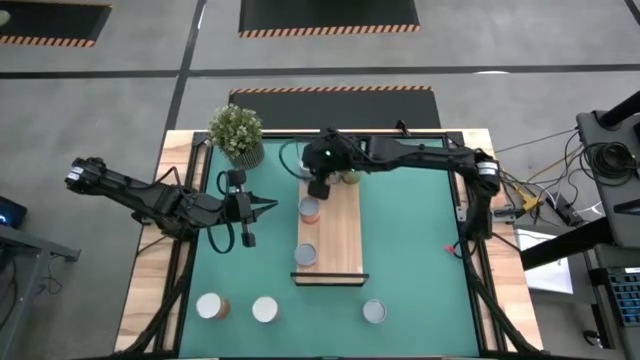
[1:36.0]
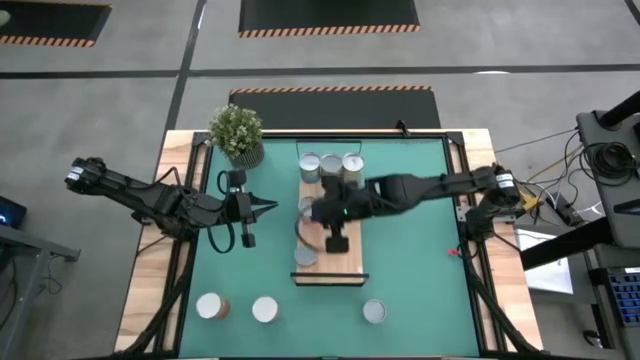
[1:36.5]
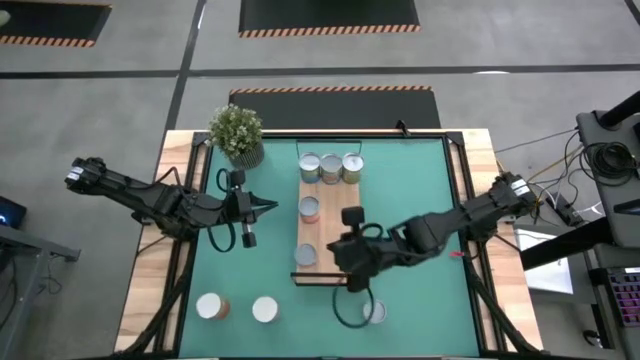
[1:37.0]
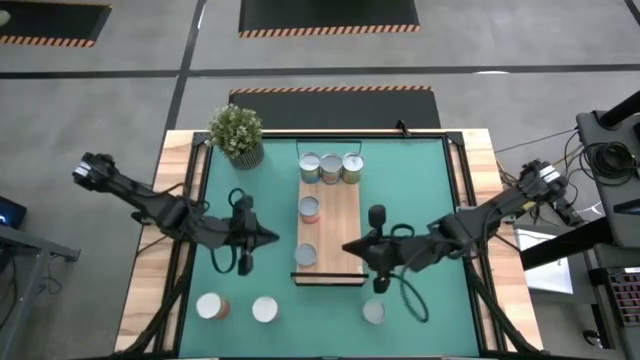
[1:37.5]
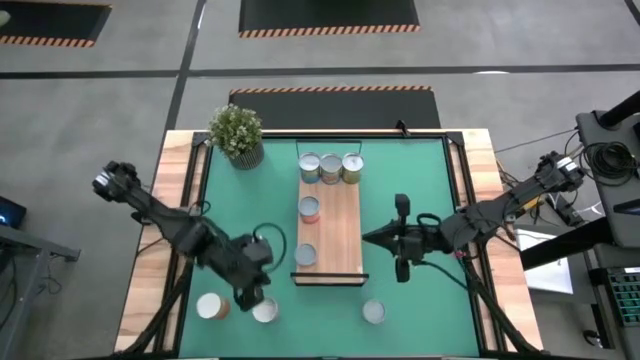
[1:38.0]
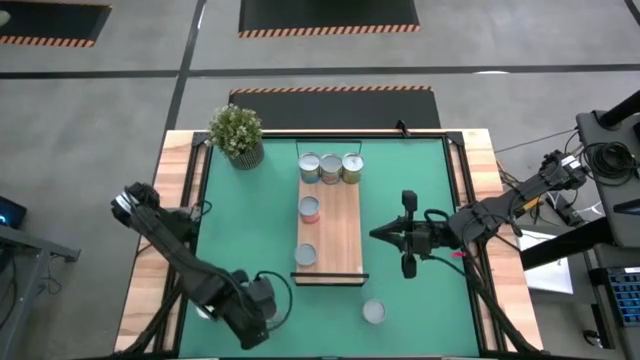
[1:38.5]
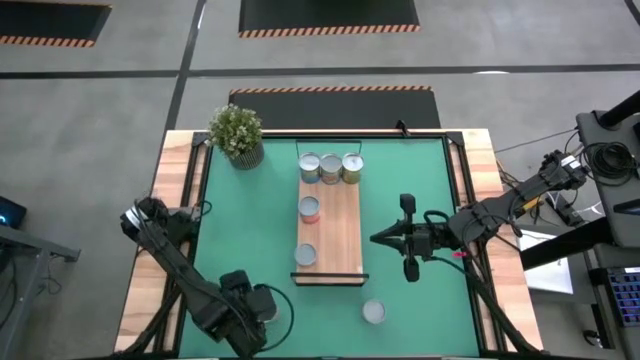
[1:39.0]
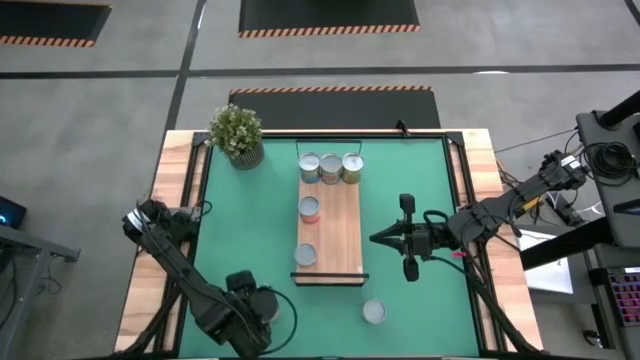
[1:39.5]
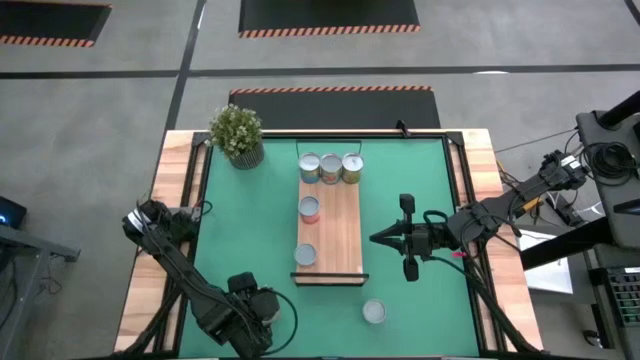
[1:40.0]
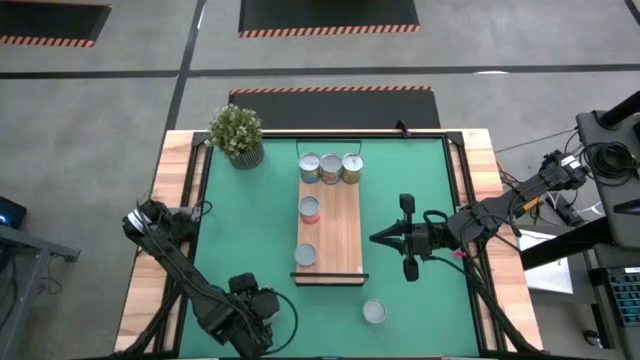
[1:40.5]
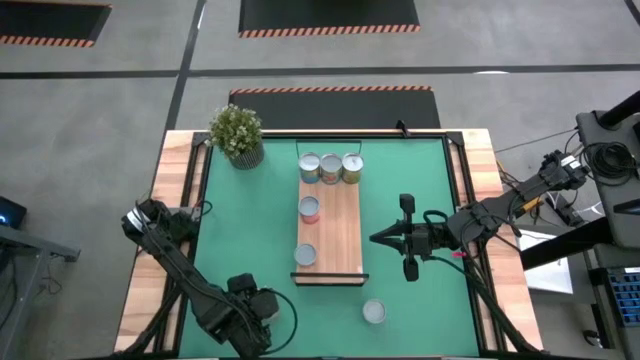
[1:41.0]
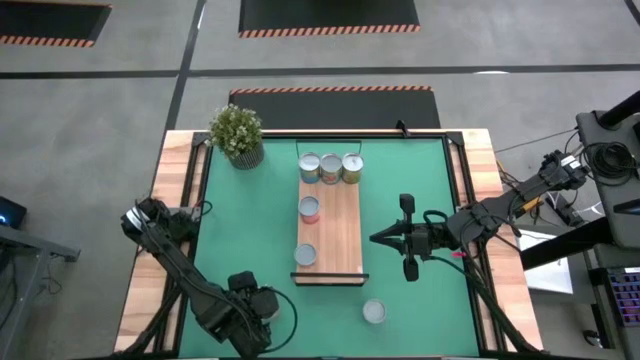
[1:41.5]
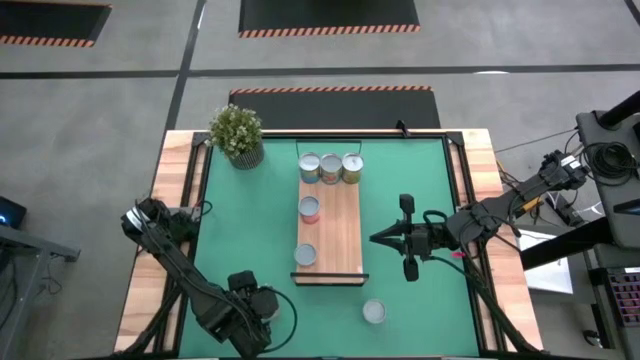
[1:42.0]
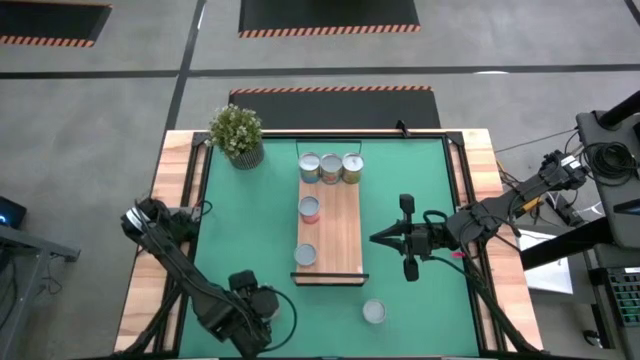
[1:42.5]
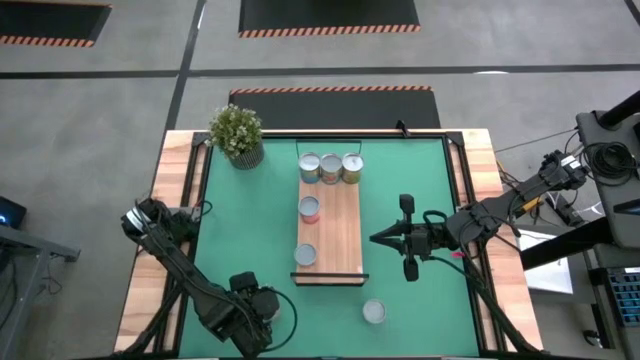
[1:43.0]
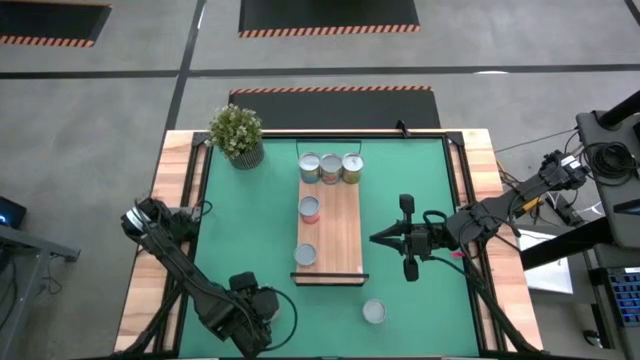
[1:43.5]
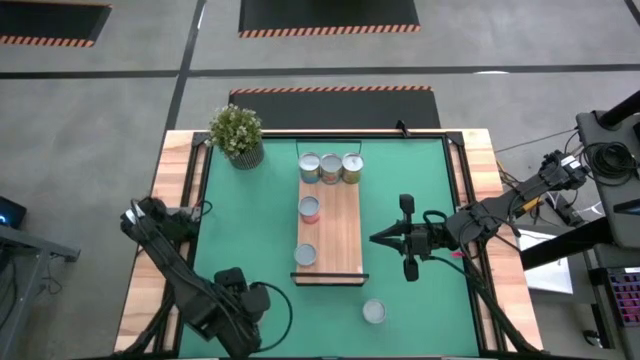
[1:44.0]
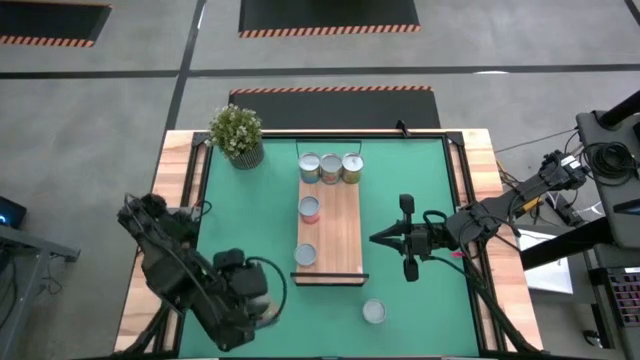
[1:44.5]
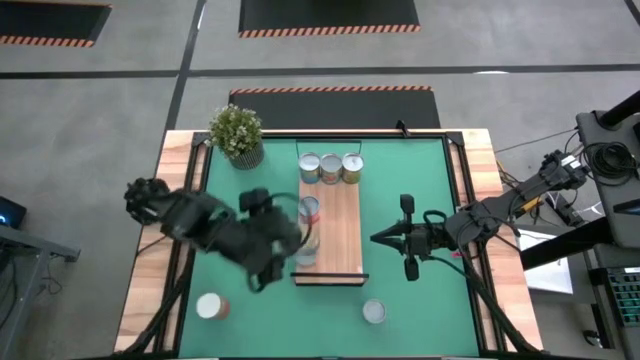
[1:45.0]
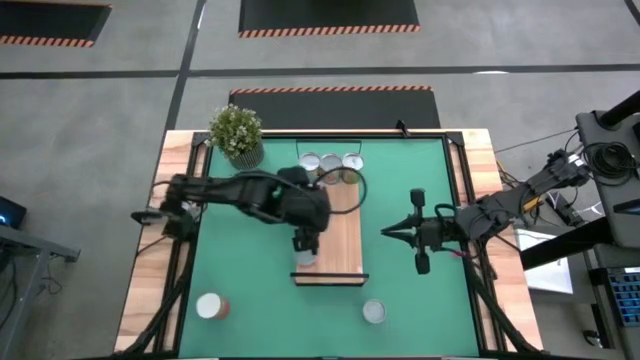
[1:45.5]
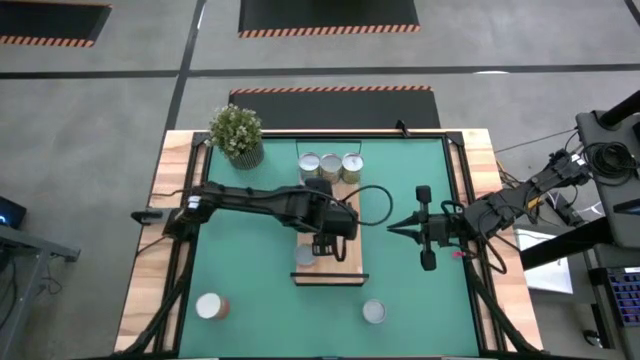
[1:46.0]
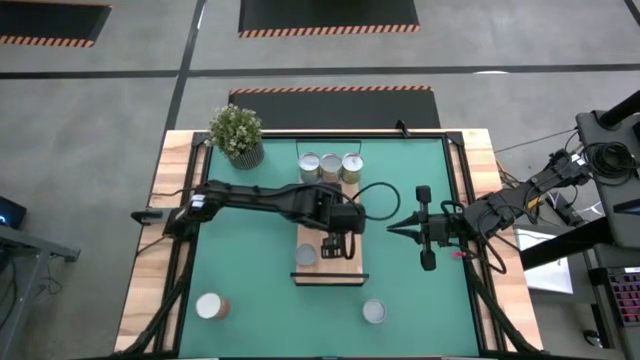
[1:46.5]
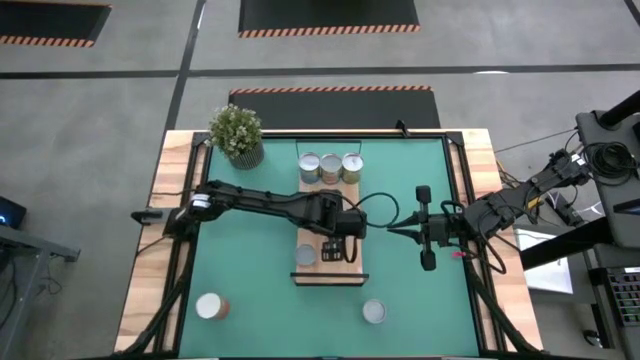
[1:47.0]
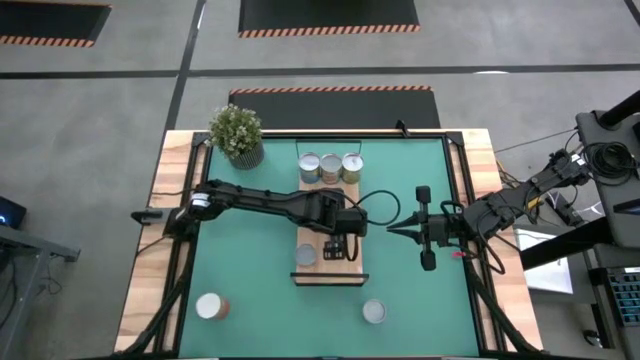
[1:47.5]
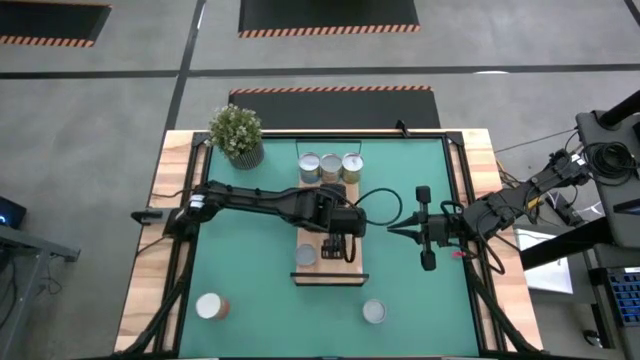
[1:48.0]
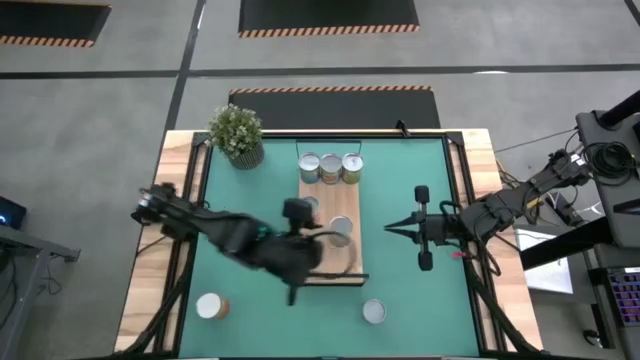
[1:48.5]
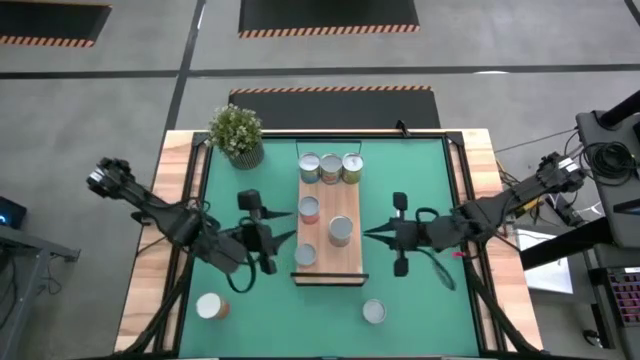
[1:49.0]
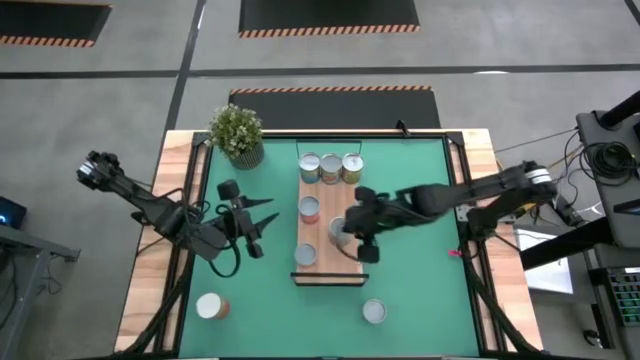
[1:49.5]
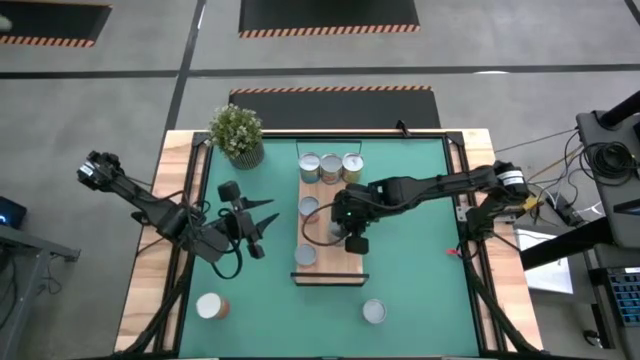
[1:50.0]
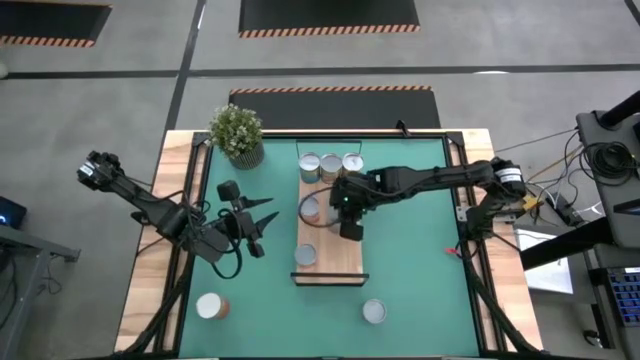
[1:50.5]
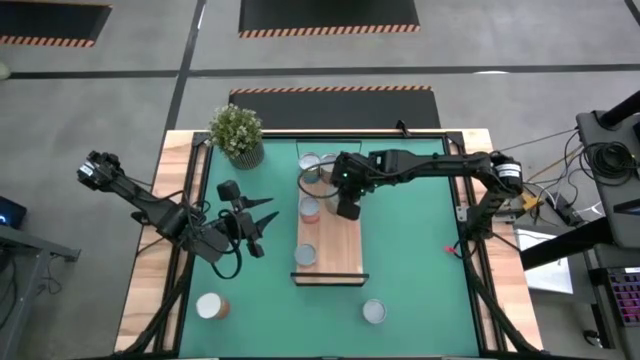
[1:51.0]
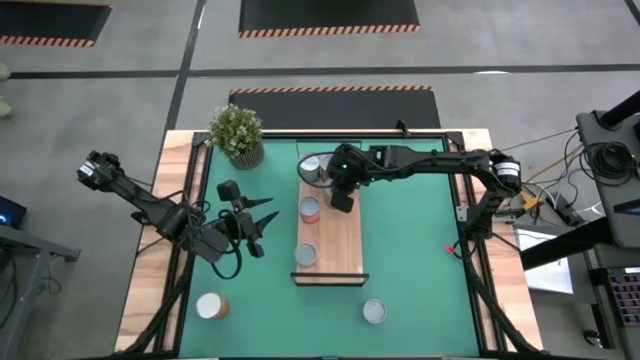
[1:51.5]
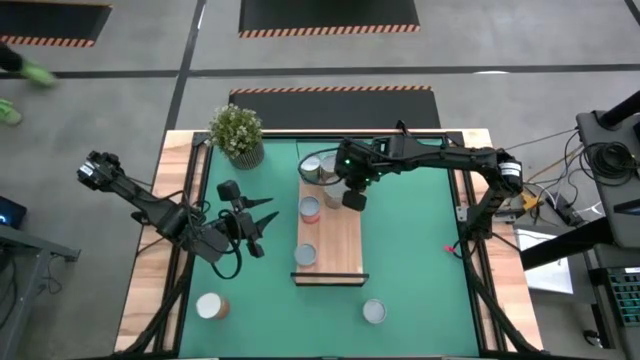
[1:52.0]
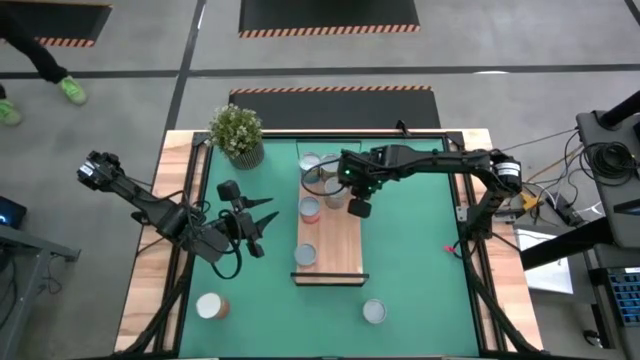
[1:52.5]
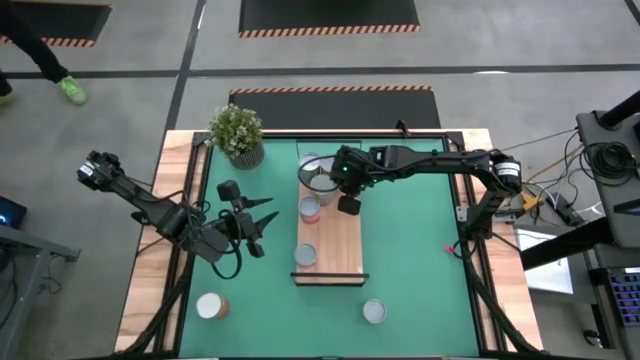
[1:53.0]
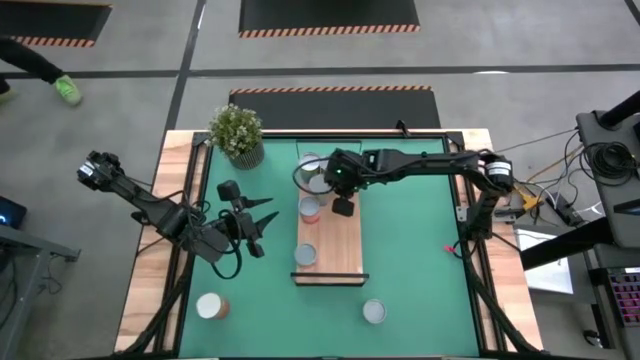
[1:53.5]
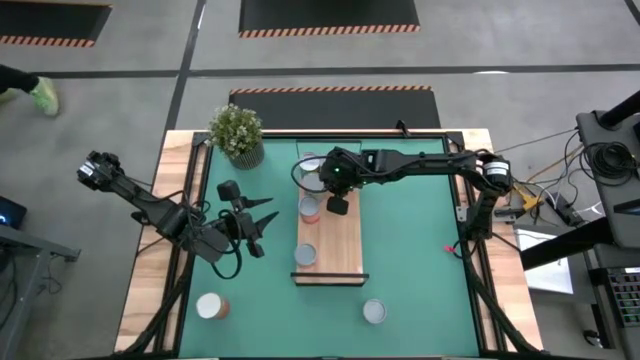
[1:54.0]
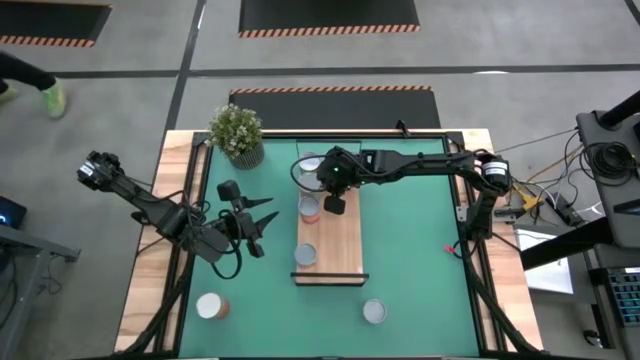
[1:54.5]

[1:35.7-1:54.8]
Task: Pick and place cans onto a shelf
Put the canned peaches on the shelf

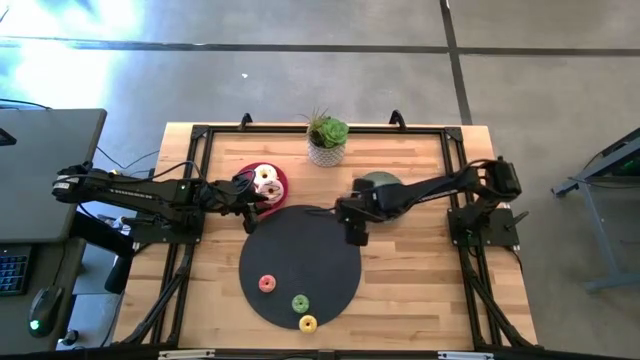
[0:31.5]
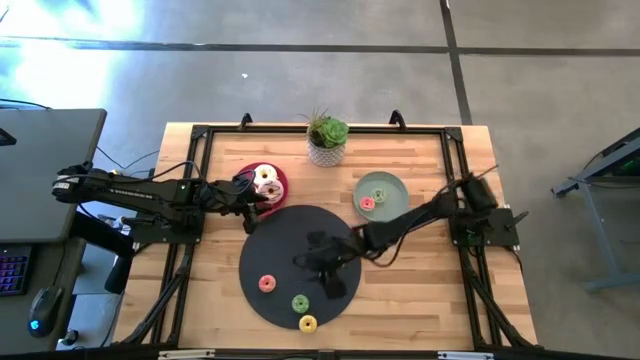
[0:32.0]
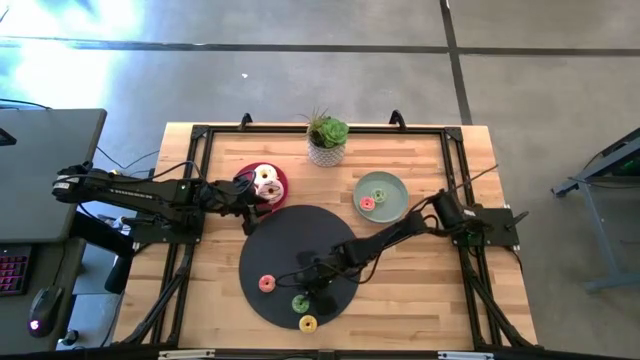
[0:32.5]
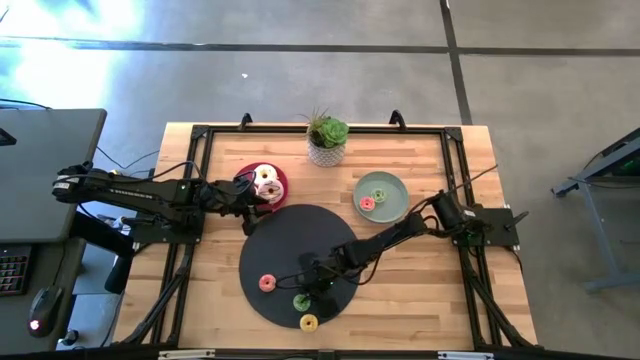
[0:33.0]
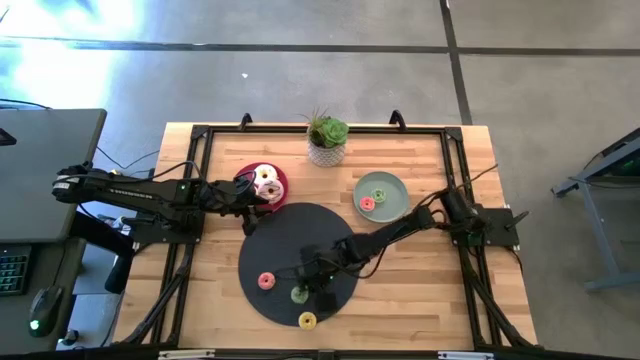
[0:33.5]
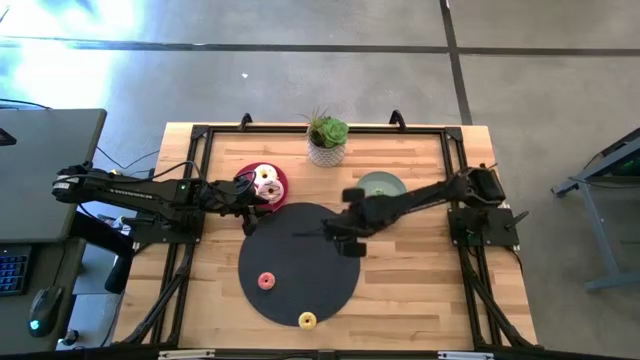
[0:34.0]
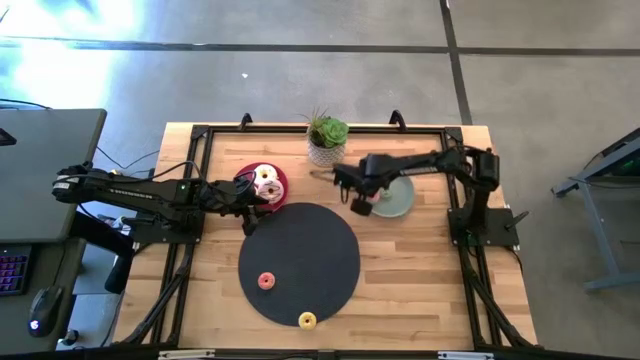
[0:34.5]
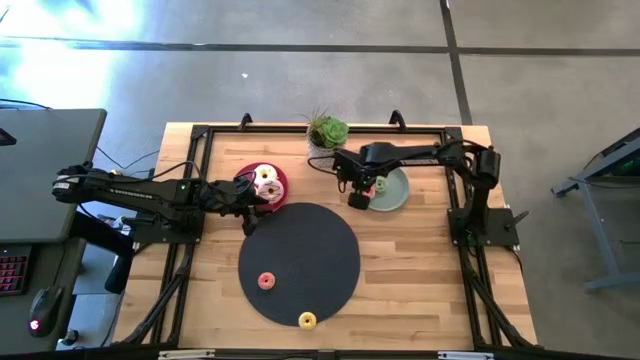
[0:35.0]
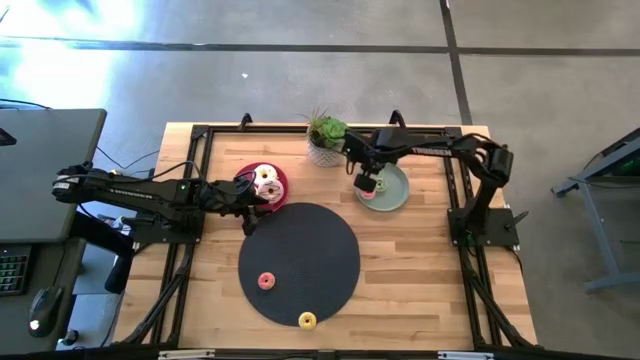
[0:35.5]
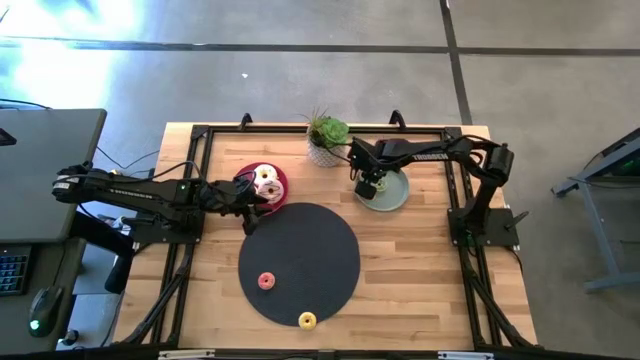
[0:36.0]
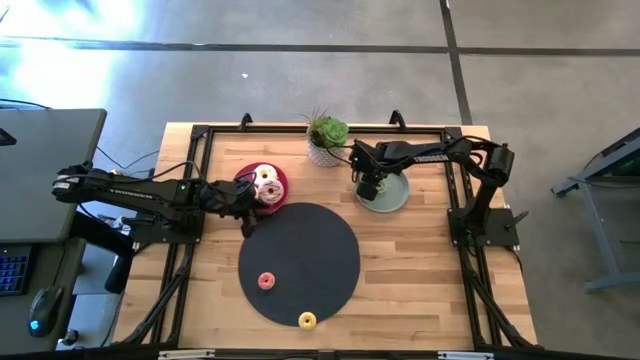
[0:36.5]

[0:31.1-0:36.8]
Task: Pick & Place donuts
Put the small green donut on the gray plate
